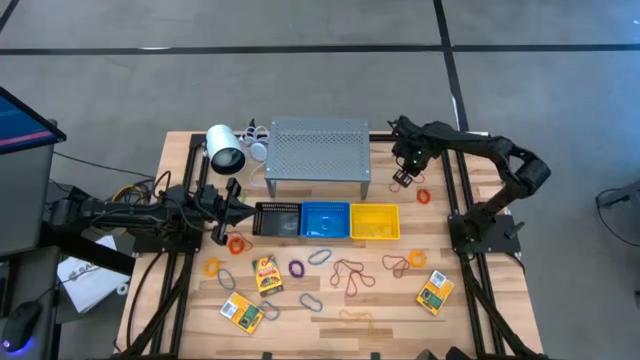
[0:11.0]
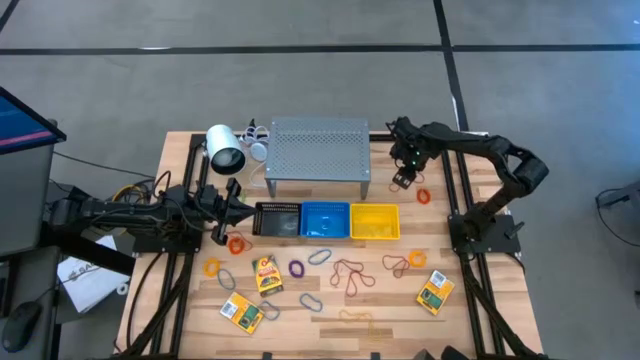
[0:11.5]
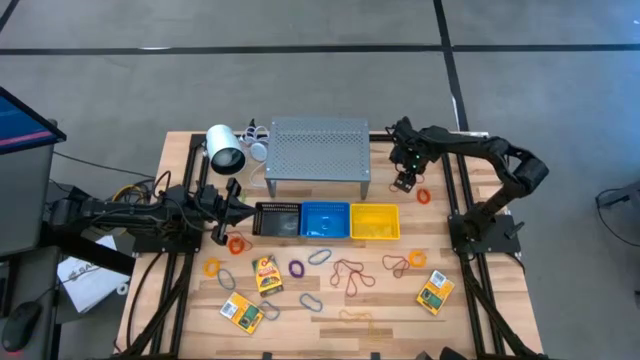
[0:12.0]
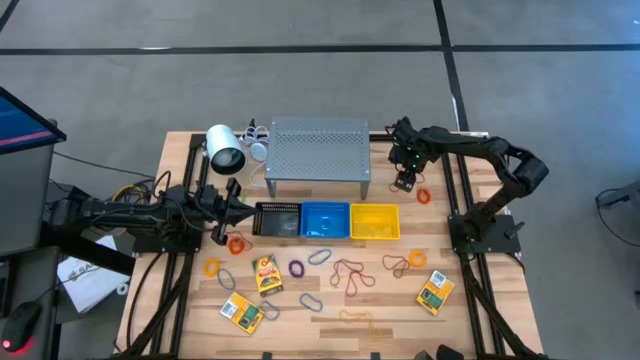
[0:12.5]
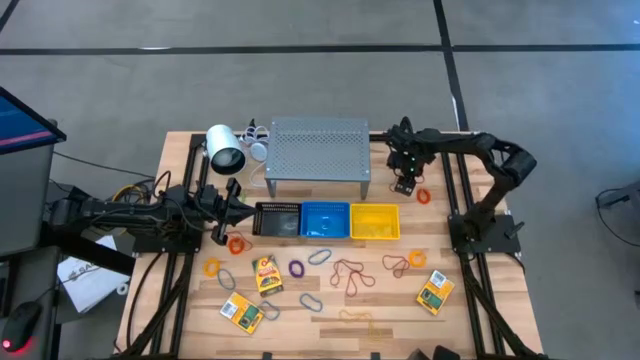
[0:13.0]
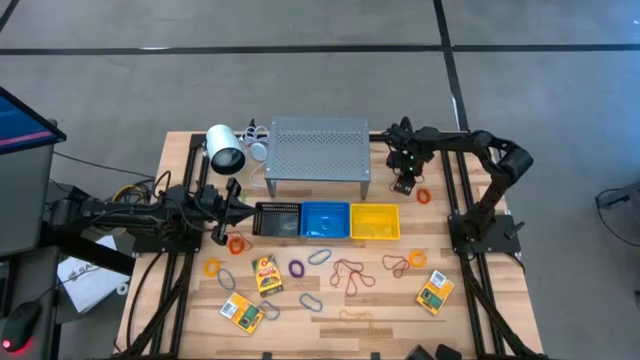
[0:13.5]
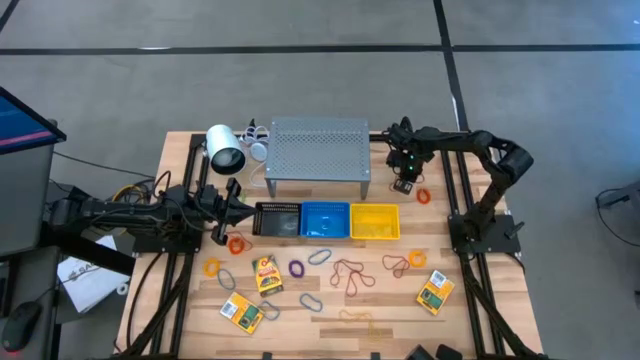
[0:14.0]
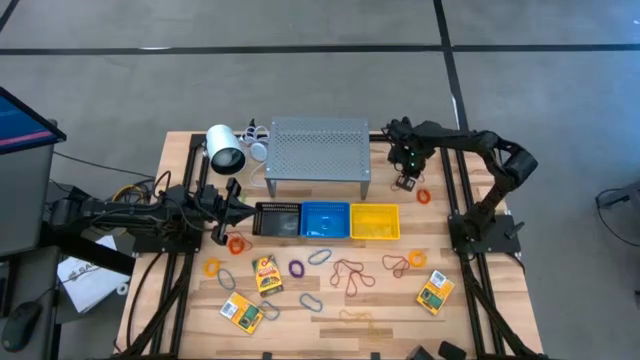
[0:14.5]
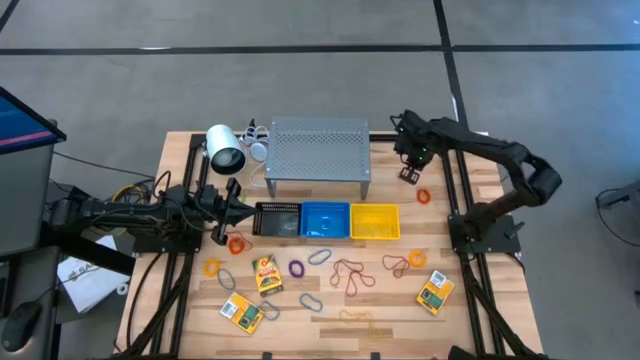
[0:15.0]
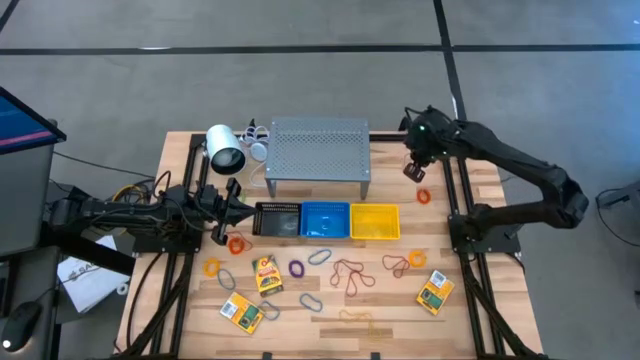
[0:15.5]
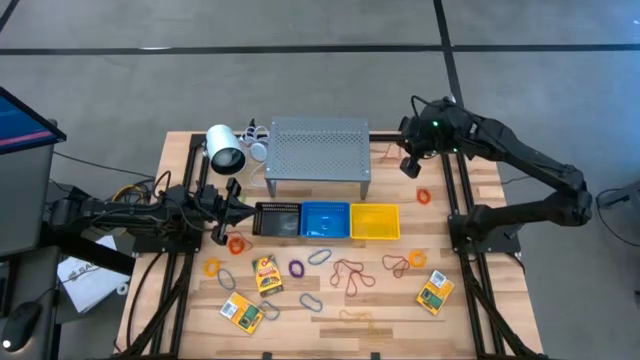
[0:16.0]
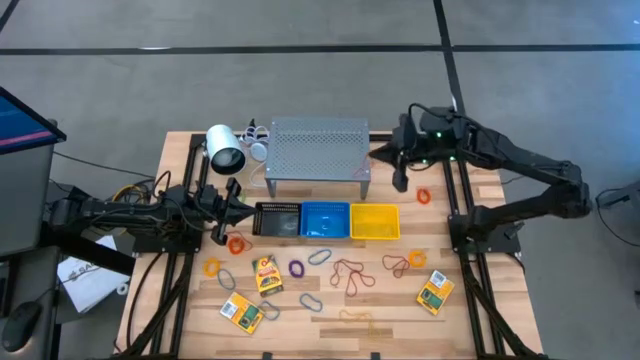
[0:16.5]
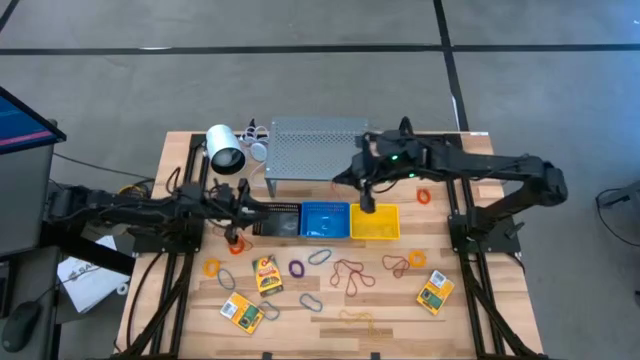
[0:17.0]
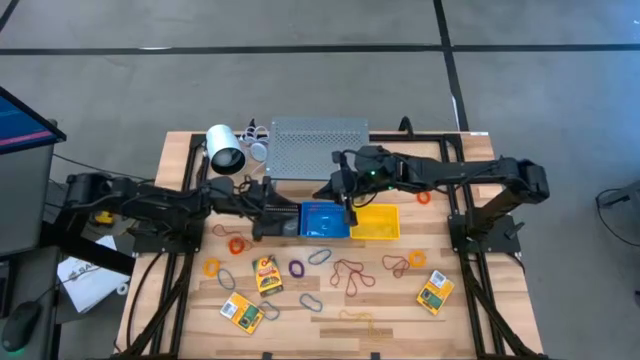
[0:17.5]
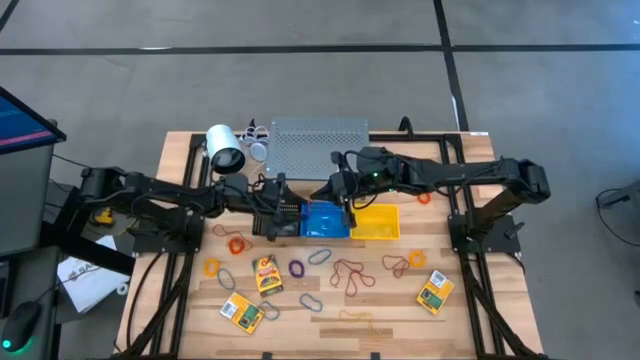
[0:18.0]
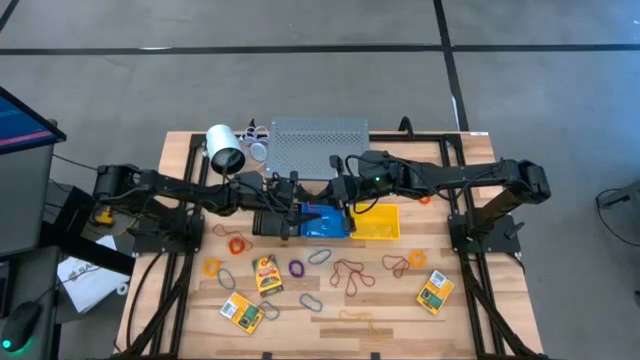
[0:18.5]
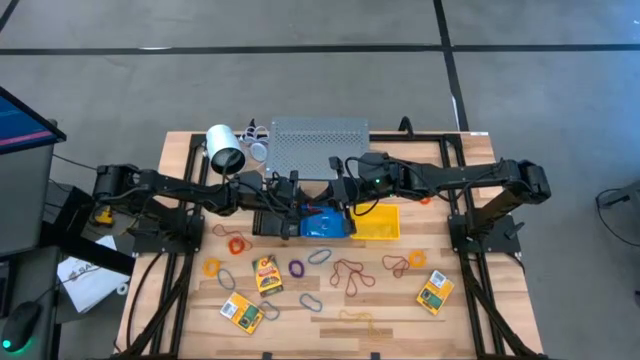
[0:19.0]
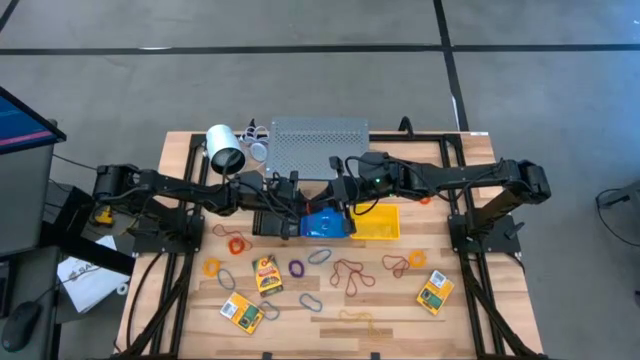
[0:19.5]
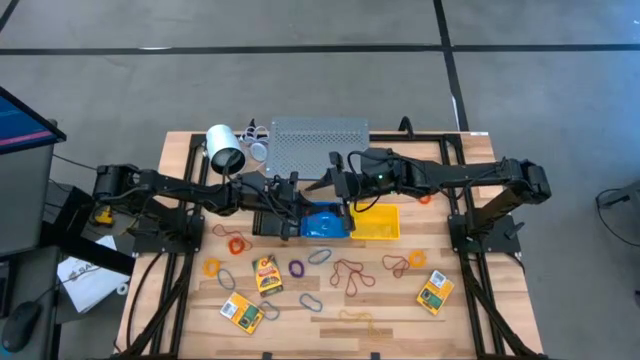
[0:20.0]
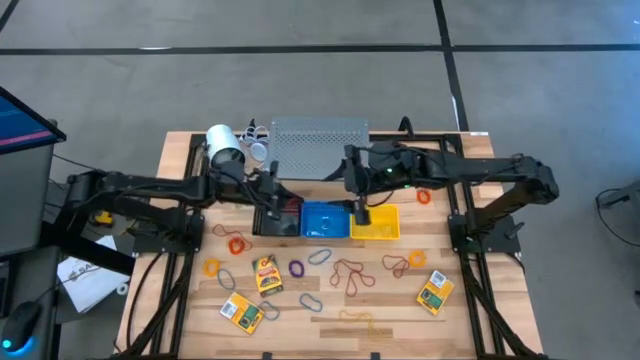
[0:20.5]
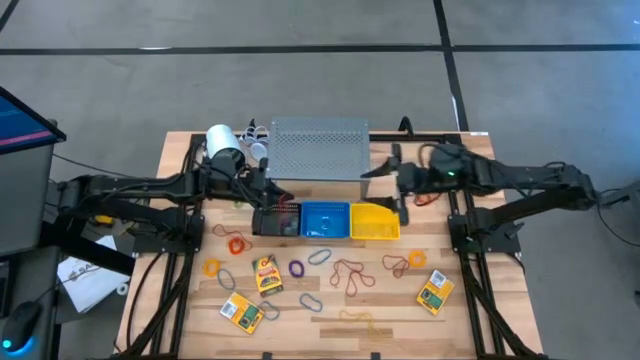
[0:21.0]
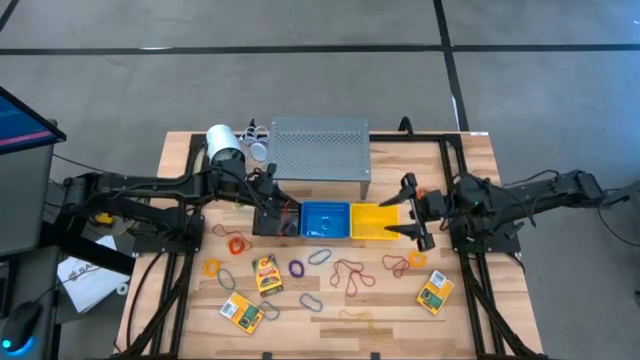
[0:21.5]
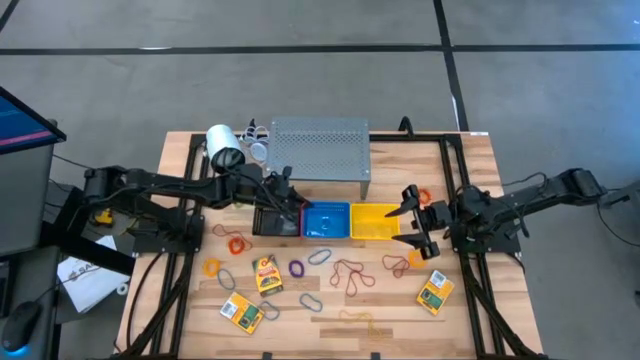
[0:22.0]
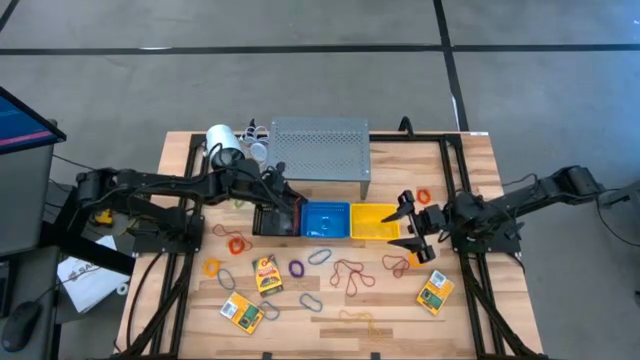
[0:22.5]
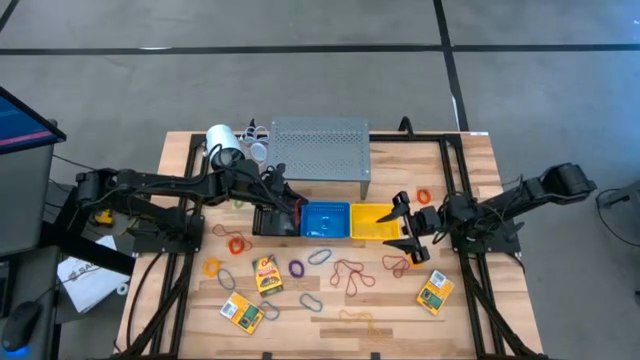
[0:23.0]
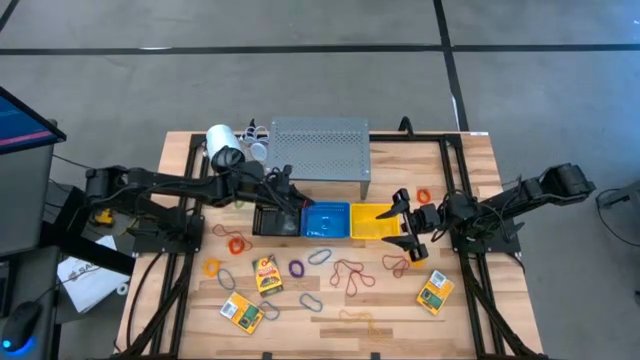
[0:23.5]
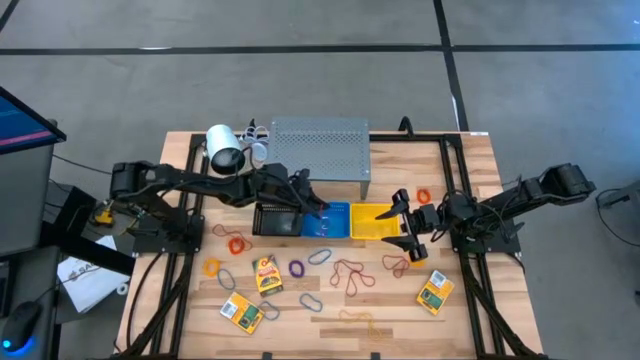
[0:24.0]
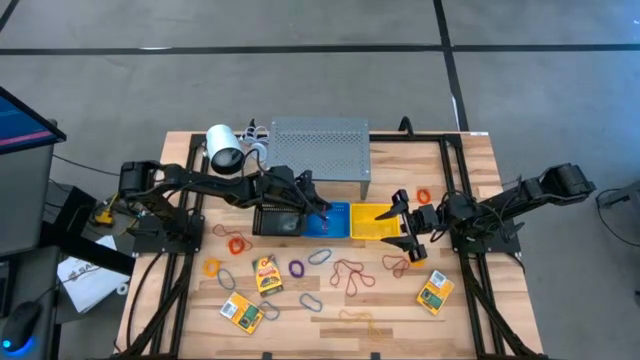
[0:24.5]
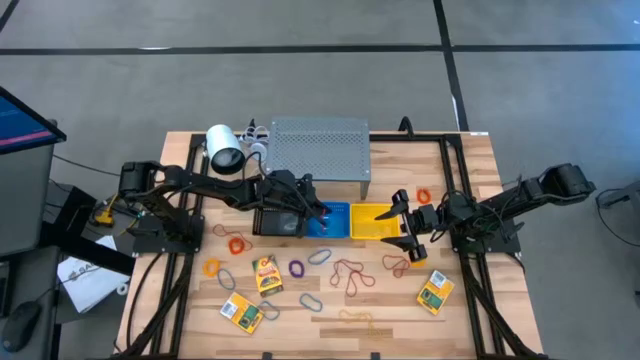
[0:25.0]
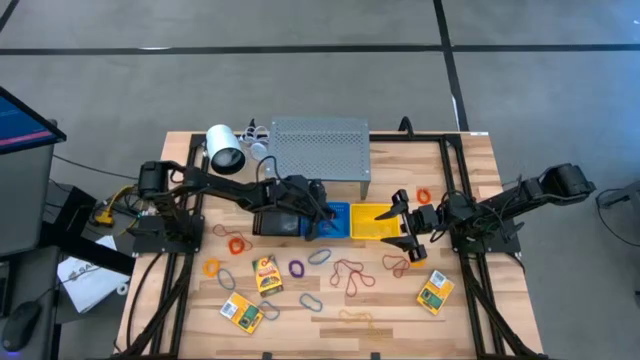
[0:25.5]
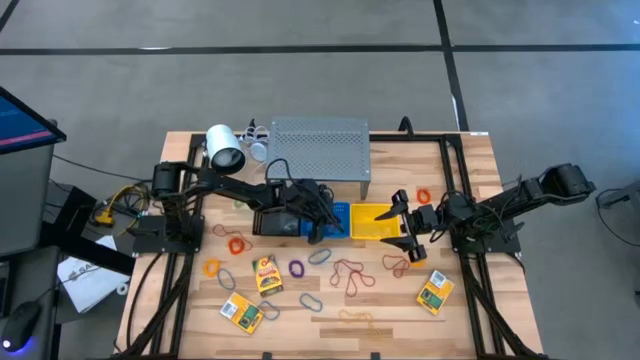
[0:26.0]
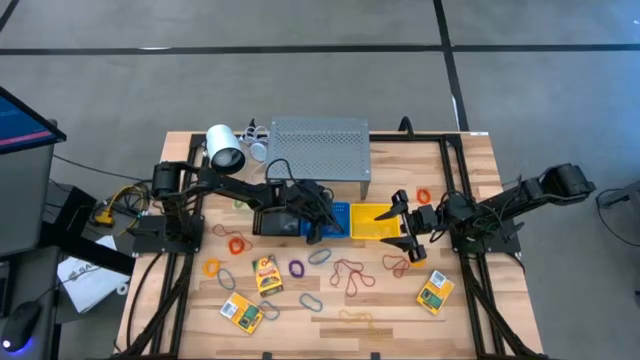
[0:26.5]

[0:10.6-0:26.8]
Task: Pick & Place Office Desk Supplies
Put the red rubber band into the blue bin

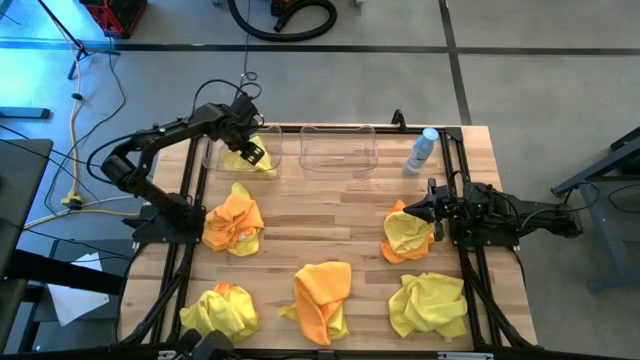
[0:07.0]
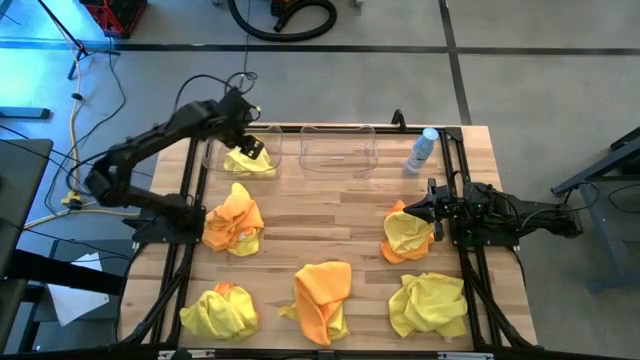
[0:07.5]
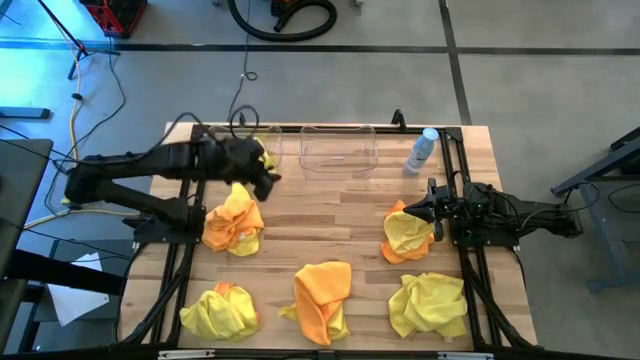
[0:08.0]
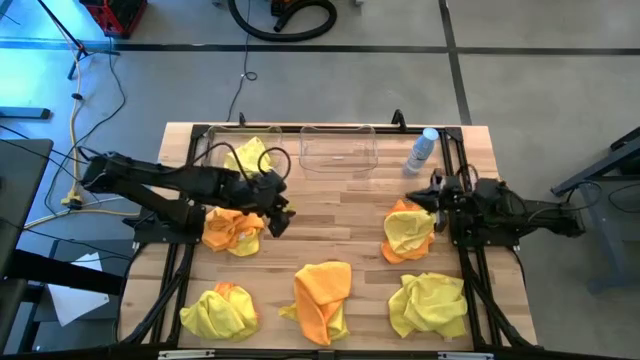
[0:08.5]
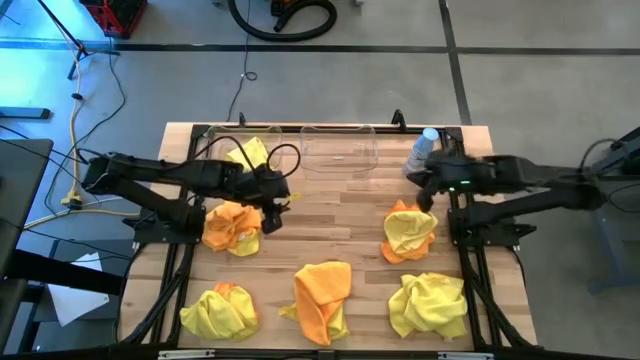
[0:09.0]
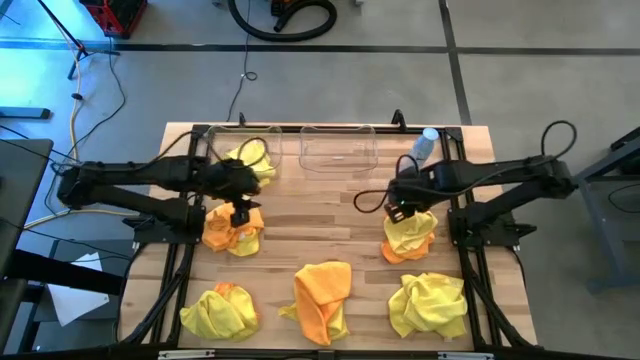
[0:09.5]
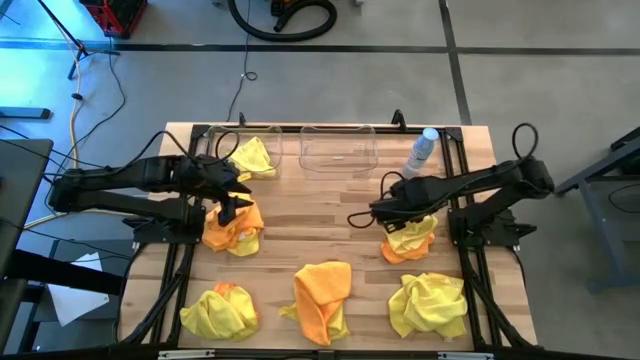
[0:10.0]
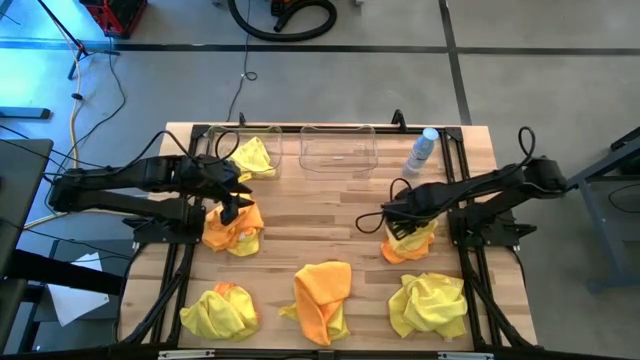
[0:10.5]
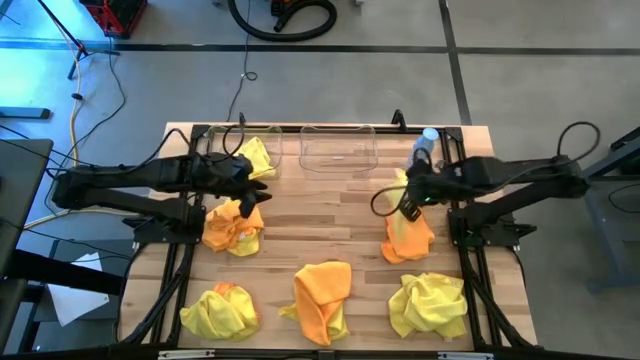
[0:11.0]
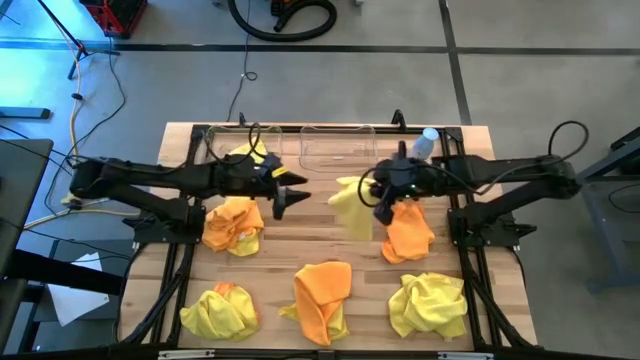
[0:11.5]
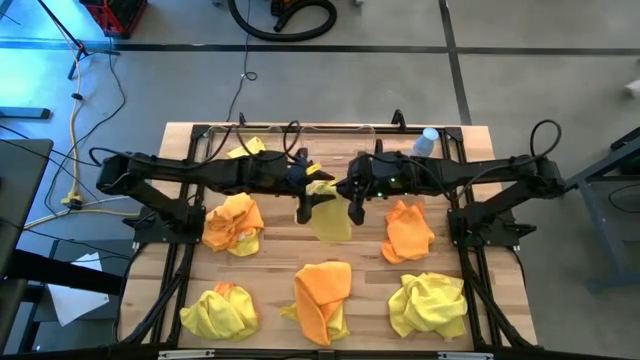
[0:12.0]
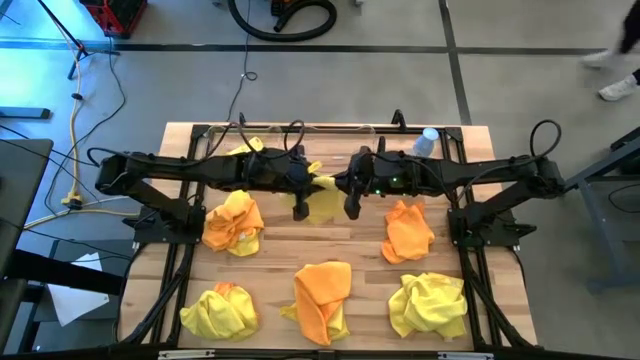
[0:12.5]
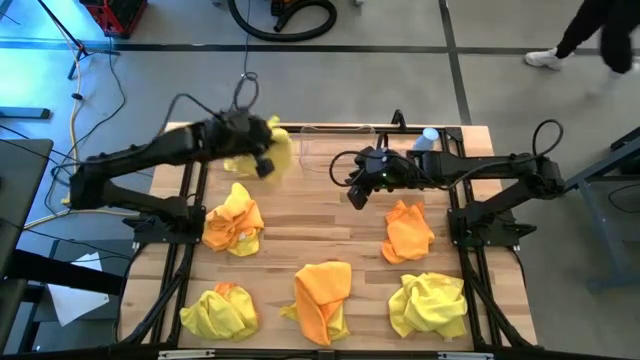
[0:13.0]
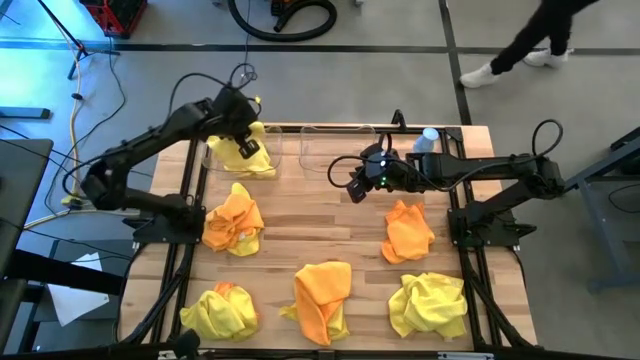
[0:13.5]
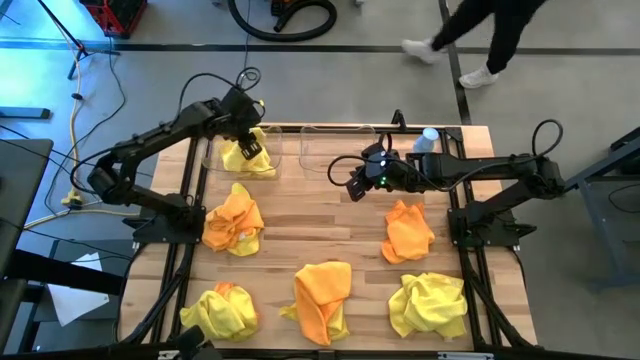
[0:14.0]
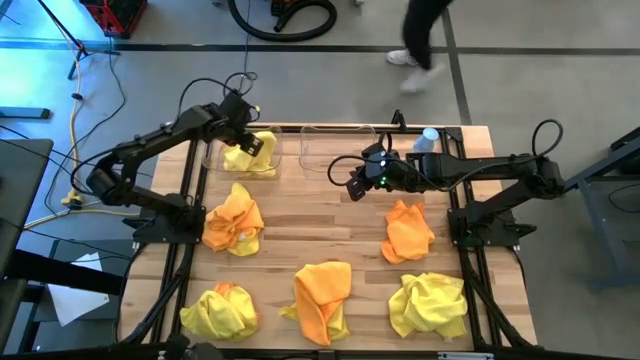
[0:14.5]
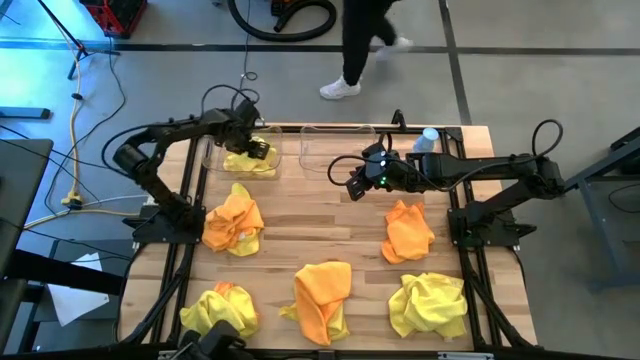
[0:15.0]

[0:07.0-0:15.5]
Task: Sort microfiber towel by color & place in baskets
Put the yellow microfiber towel into the left transparent bin
